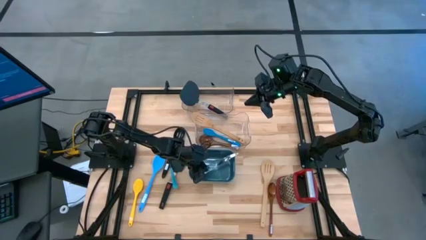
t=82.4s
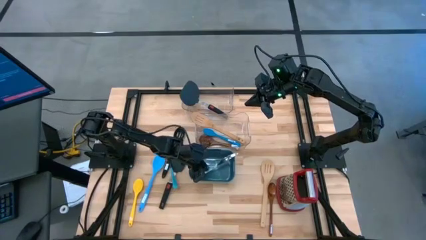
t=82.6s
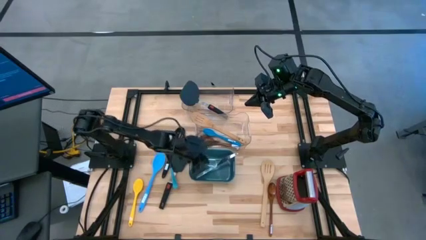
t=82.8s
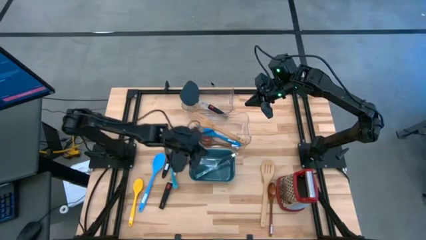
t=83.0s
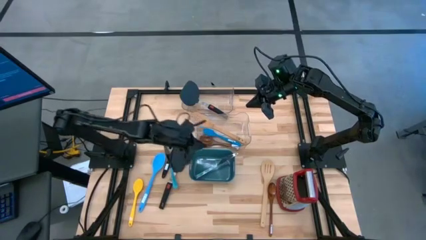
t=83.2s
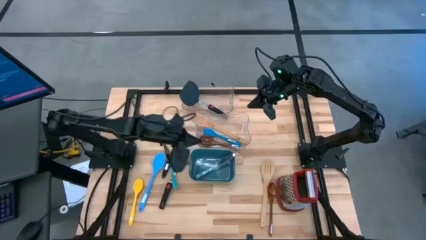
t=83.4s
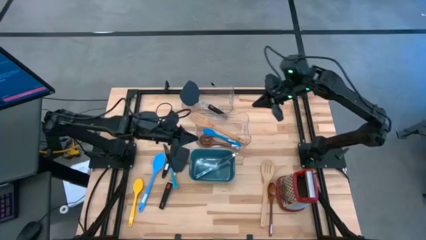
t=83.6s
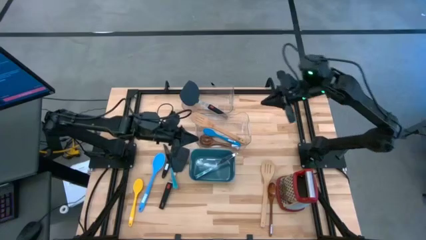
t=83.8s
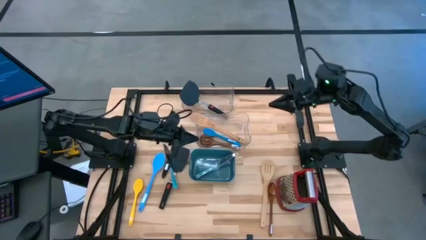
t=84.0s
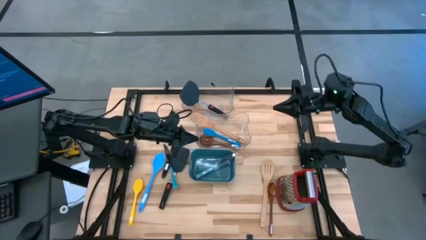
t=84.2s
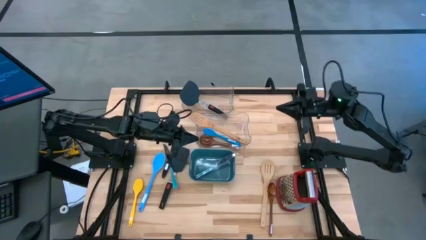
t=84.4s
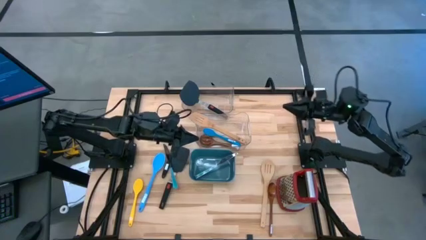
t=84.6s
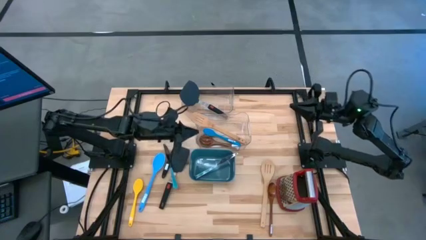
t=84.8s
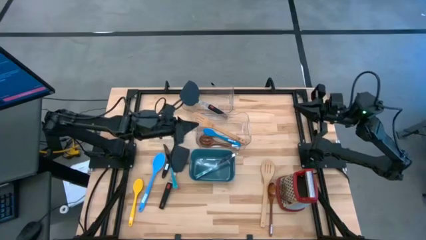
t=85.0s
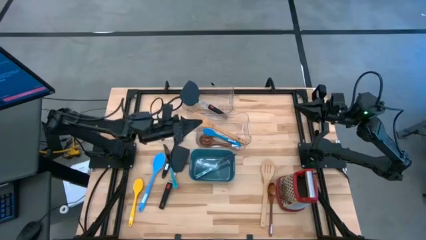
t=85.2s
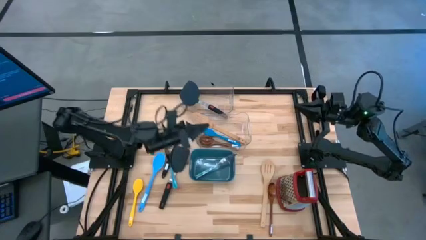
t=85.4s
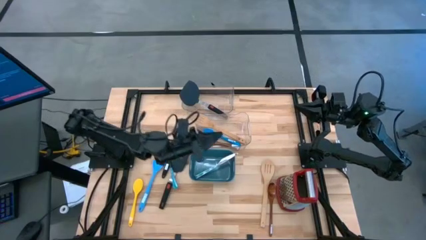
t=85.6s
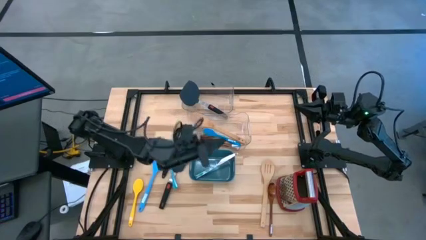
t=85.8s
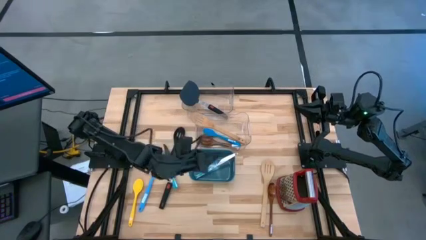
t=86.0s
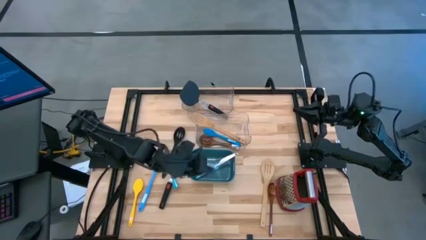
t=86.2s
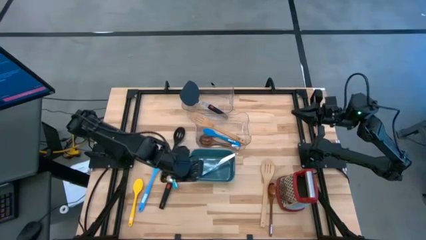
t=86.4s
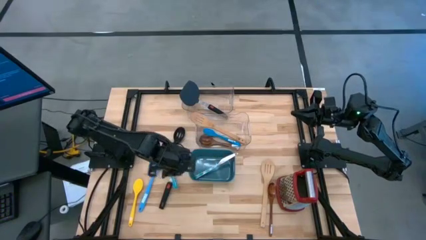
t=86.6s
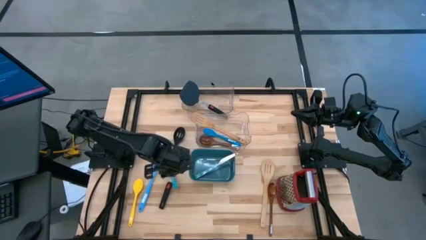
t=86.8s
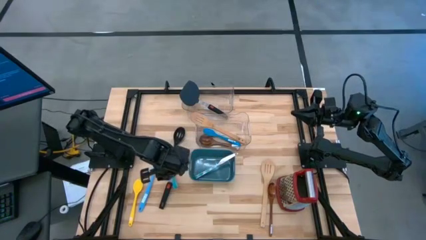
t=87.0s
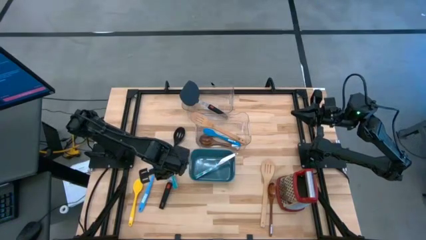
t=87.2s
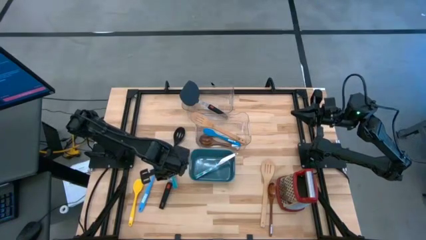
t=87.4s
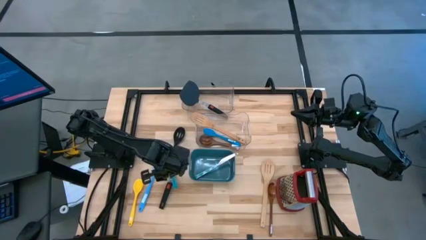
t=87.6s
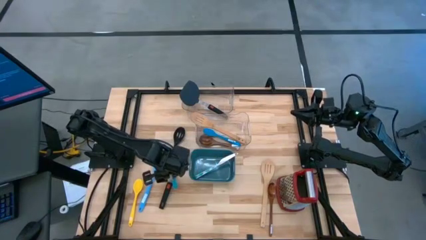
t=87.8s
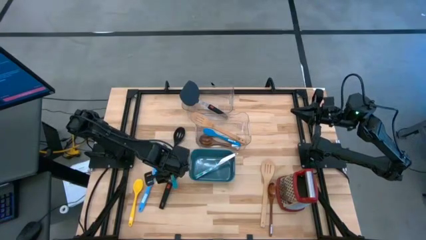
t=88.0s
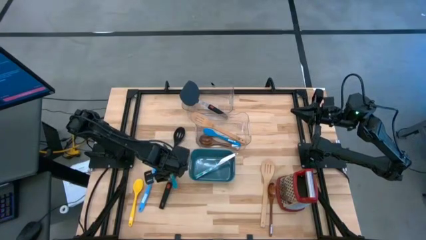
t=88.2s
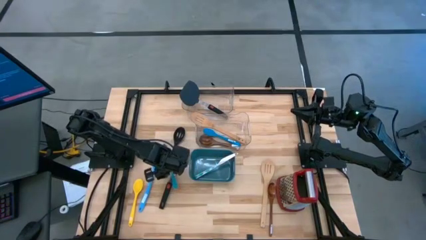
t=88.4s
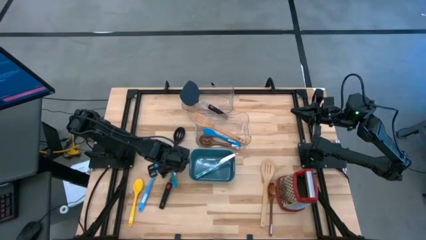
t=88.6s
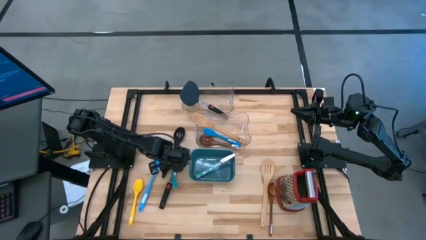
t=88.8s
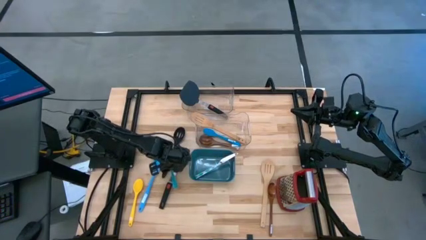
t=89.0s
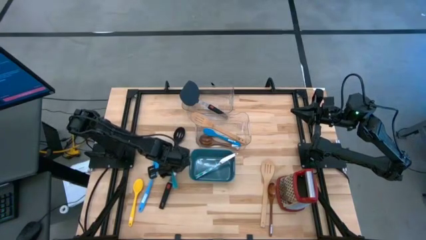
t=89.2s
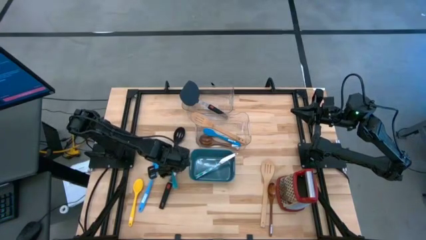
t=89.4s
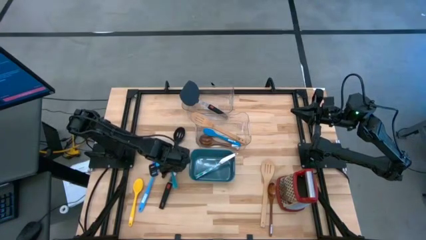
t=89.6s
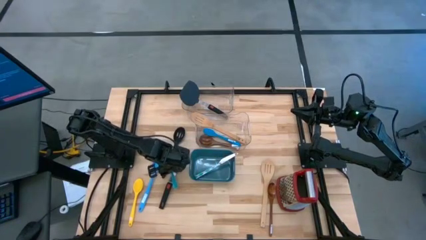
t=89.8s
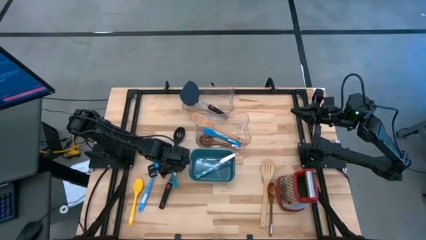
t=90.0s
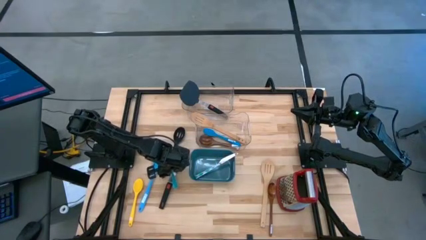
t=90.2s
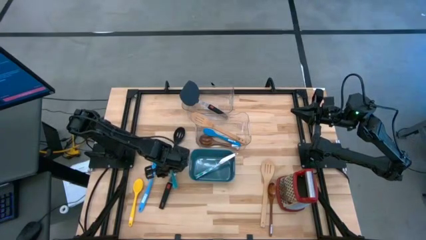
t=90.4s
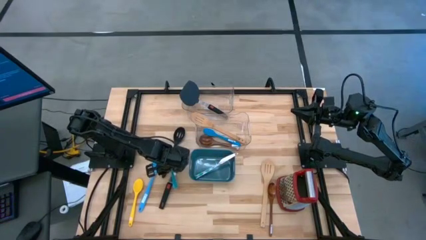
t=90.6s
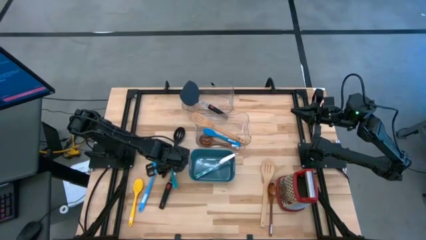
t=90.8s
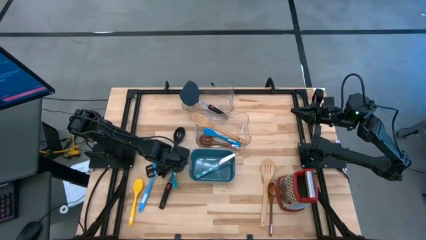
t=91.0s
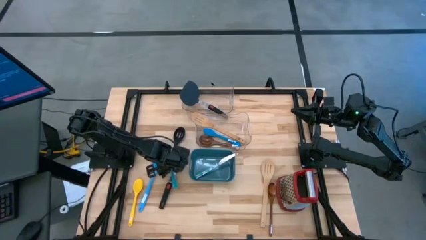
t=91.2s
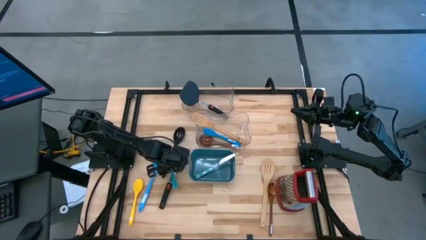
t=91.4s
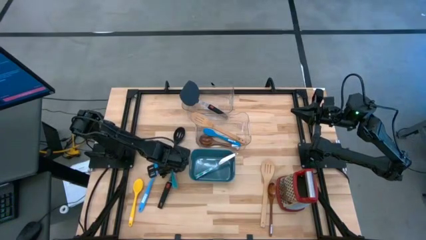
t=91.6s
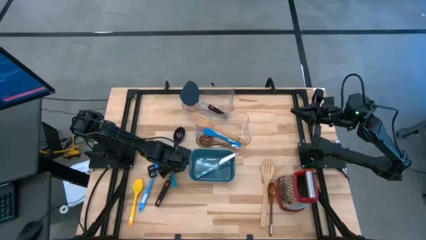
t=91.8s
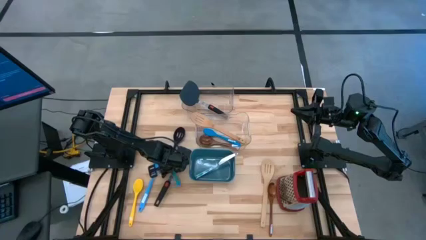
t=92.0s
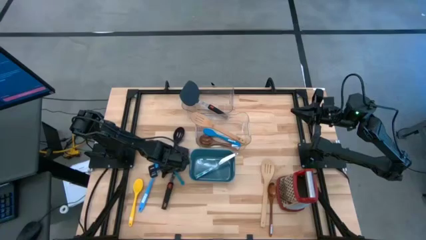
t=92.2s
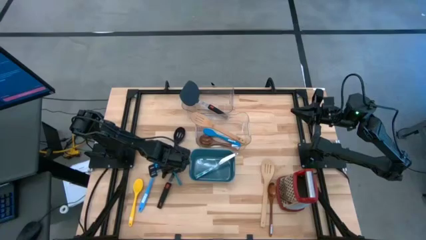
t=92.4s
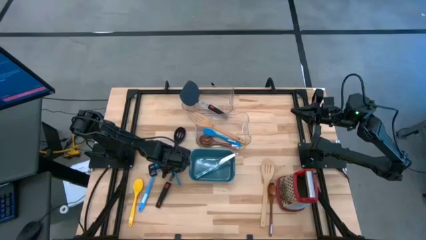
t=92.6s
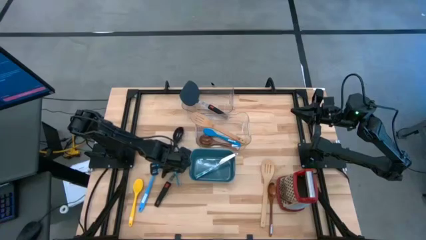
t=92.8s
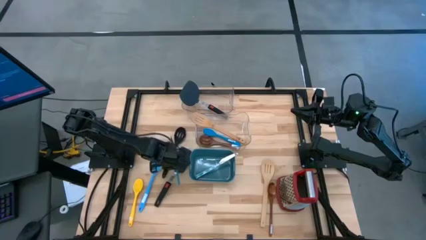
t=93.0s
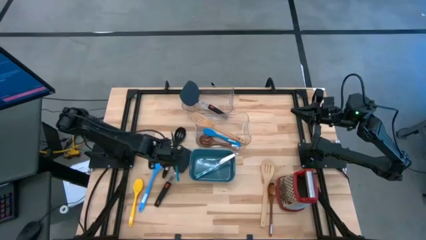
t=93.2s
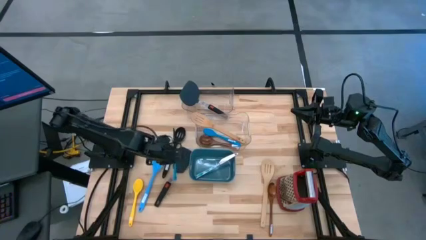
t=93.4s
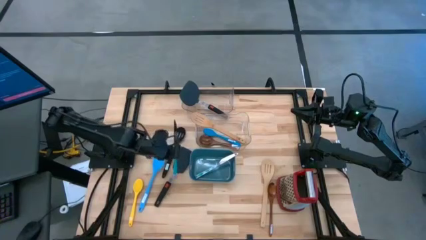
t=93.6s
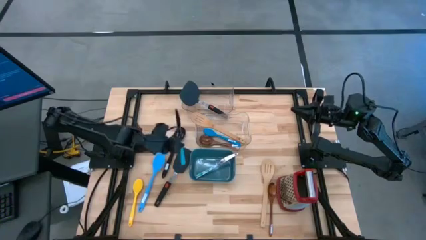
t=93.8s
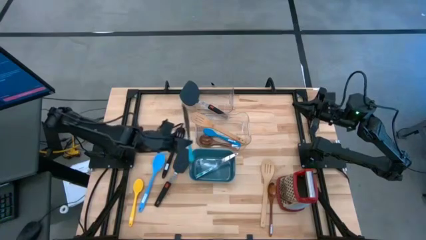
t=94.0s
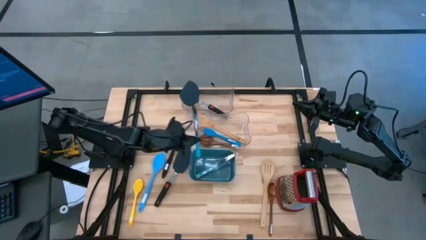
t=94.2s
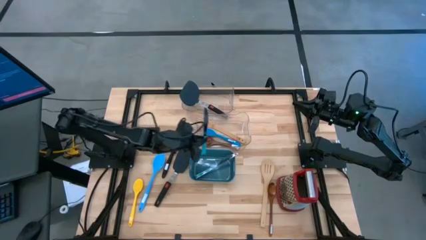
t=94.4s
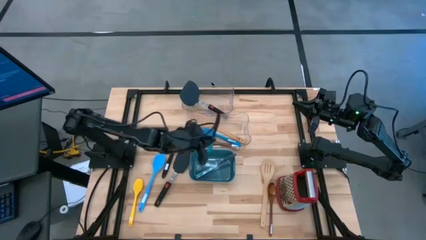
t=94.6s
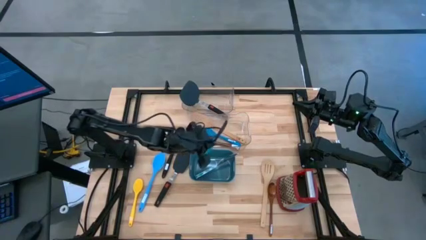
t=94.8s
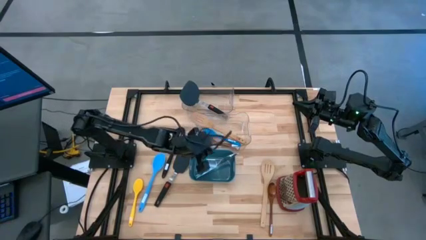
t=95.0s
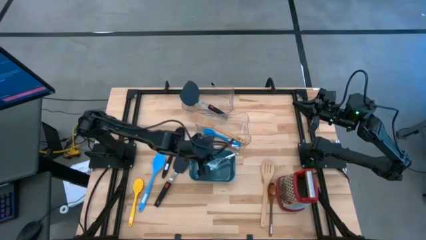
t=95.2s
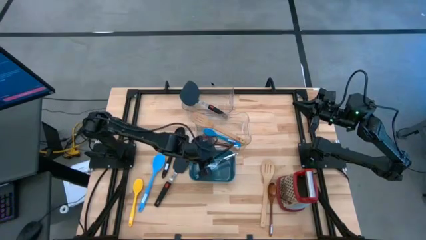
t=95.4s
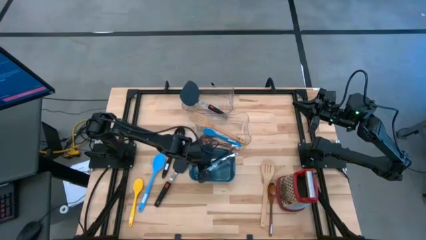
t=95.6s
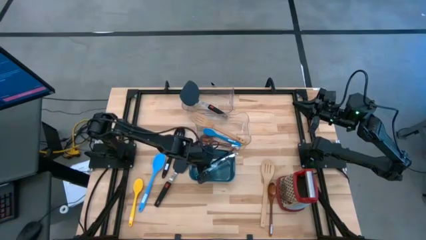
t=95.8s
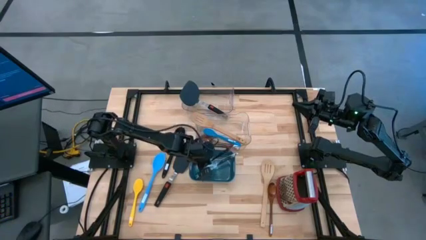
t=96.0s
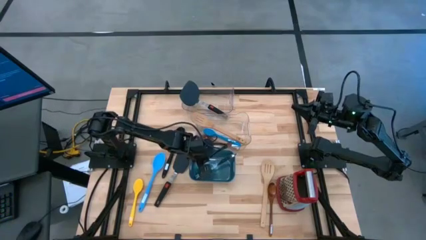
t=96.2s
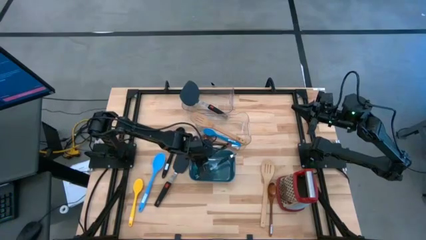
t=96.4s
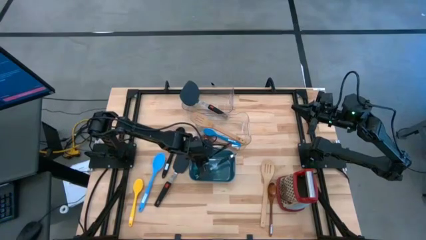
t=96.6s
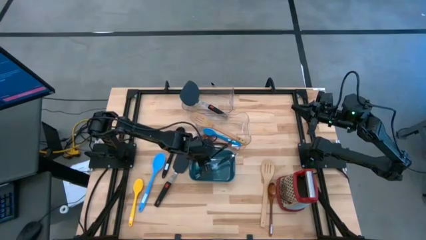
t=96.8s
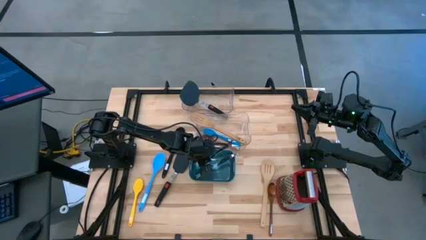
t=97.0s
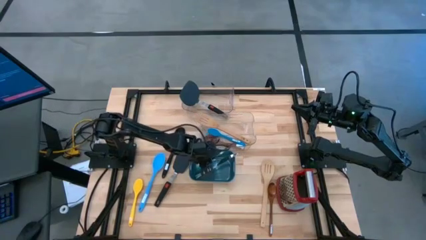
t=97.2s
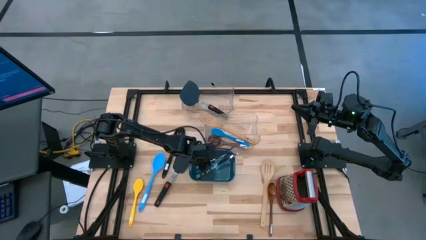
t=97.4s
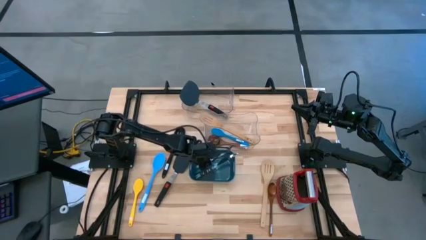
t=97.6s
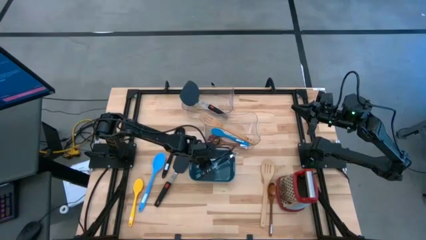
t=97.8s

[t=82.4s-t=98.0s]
Task: Pick & Place Kitchen Items
Put the blue table knife into the blue bin
